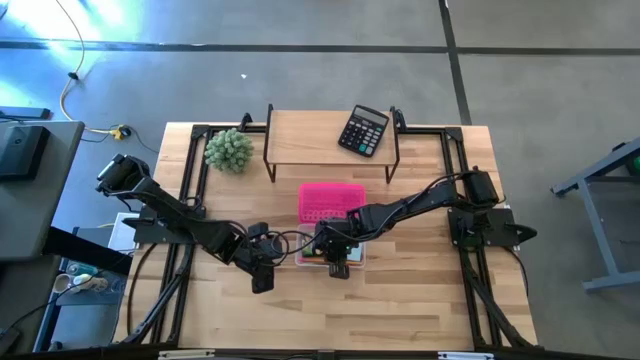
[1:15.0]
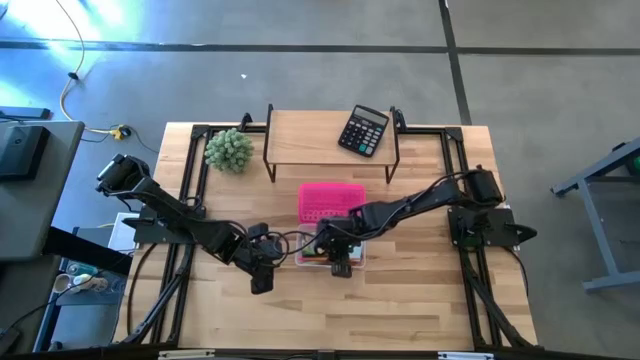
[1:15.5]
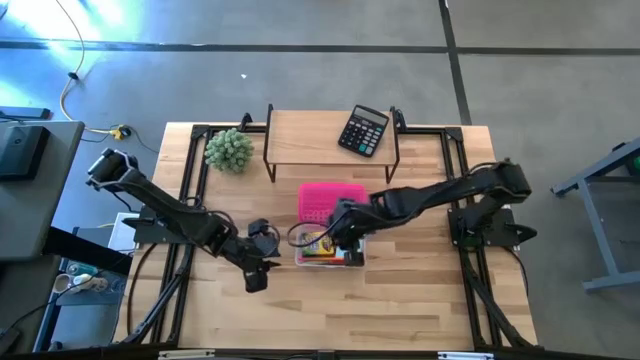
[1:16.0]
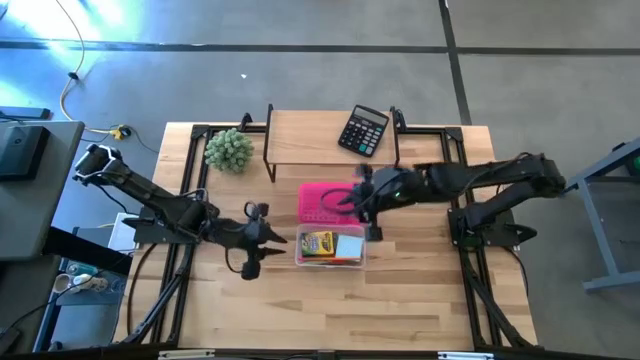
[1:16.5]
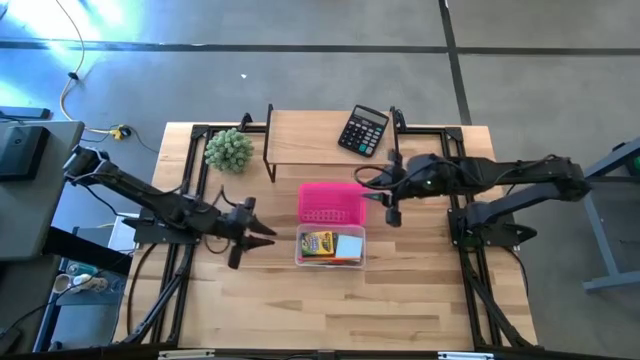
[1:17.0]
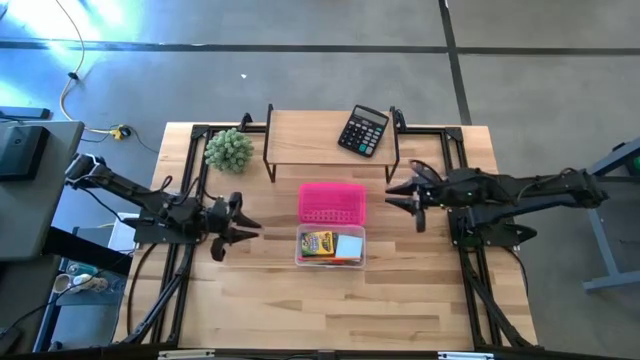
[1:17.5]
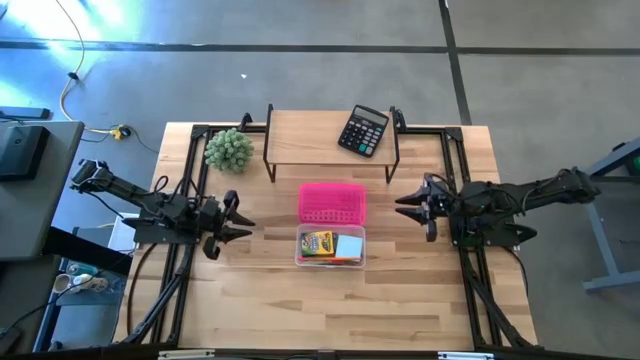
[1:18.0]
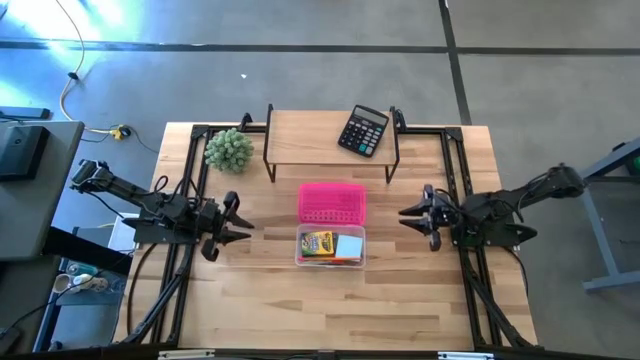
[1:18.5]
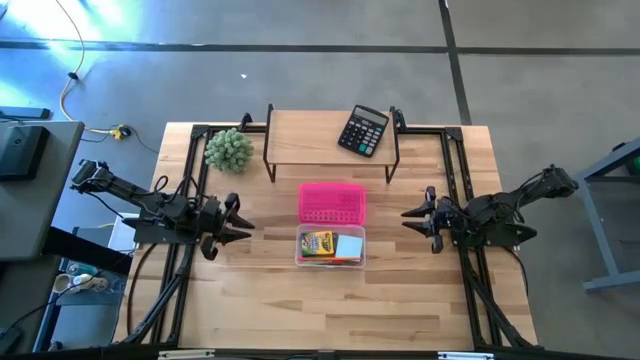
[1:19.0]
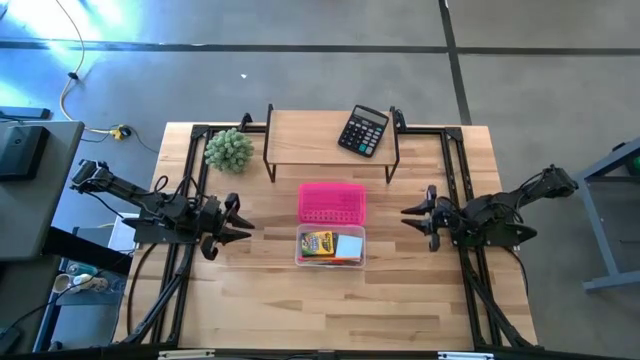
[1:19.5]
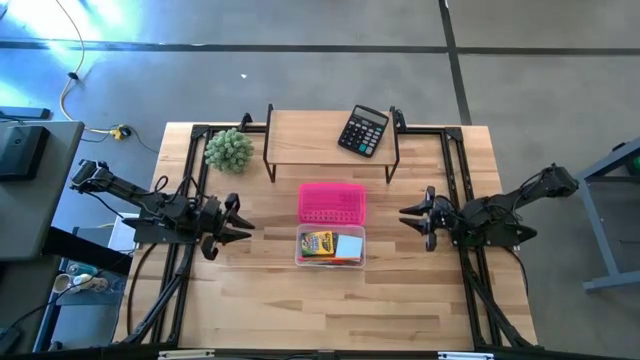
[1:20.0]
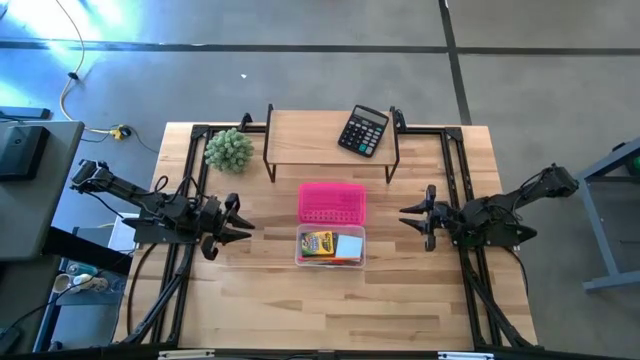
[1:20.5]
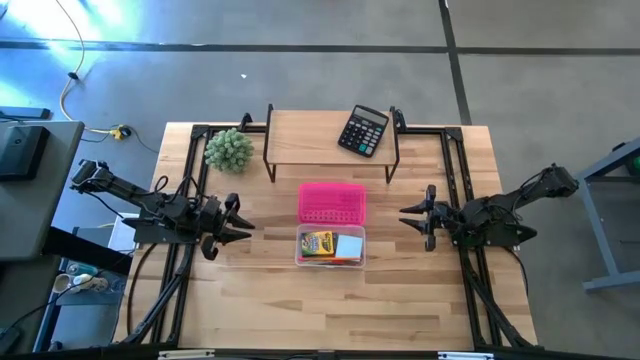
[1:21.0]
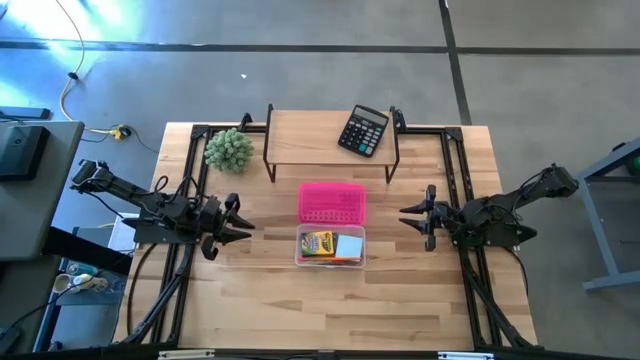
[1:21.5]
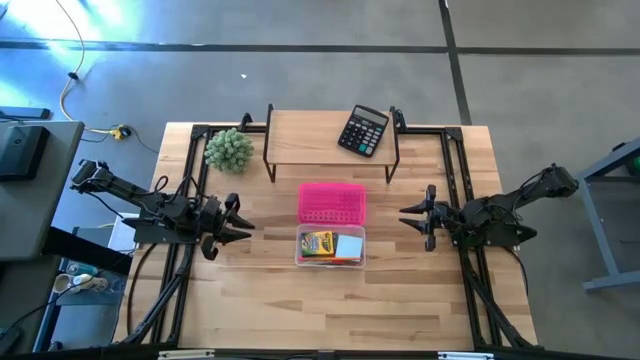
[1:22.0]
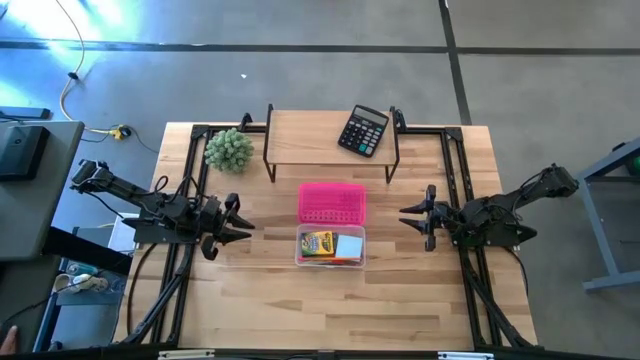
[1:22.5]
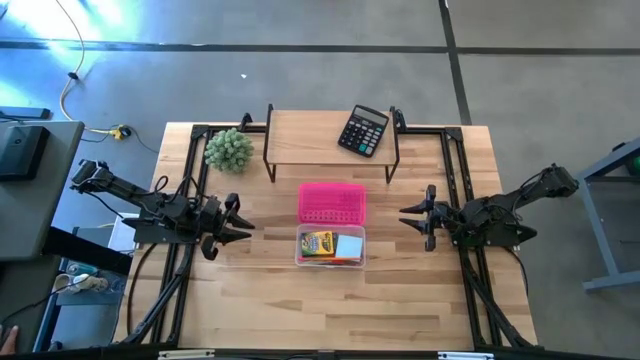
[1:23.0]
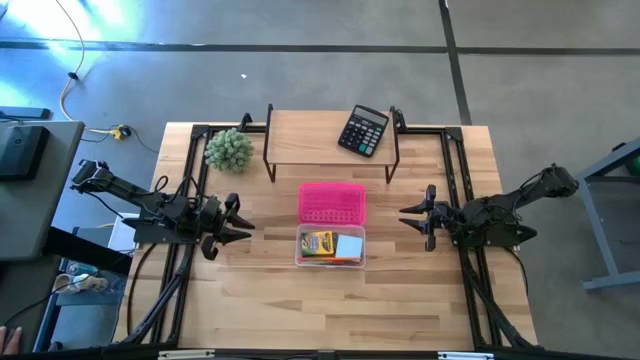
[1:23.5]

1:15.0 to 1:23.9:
Task: Pack school essentials
Return to Home Position

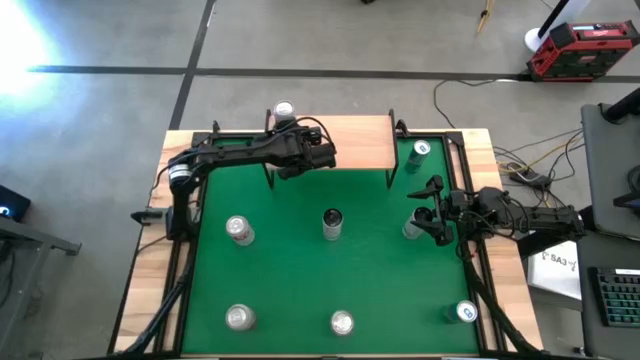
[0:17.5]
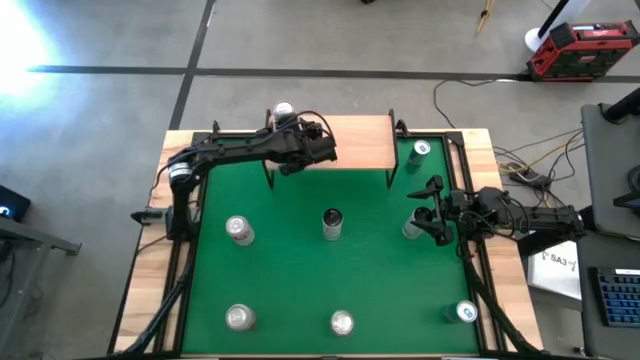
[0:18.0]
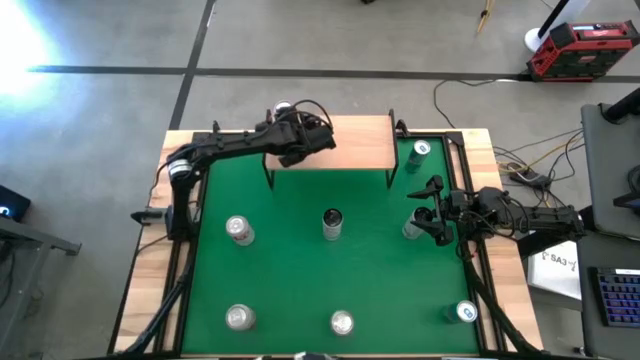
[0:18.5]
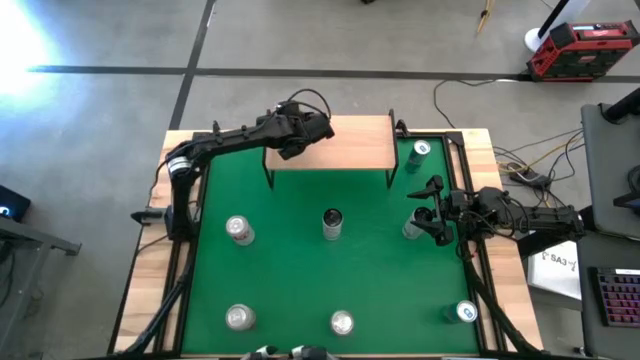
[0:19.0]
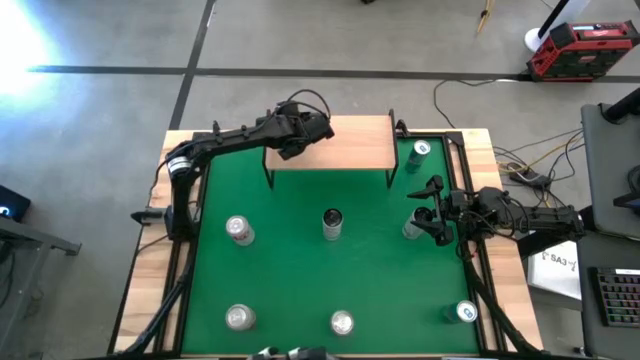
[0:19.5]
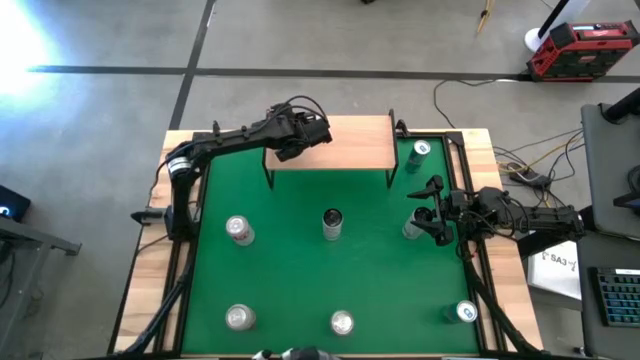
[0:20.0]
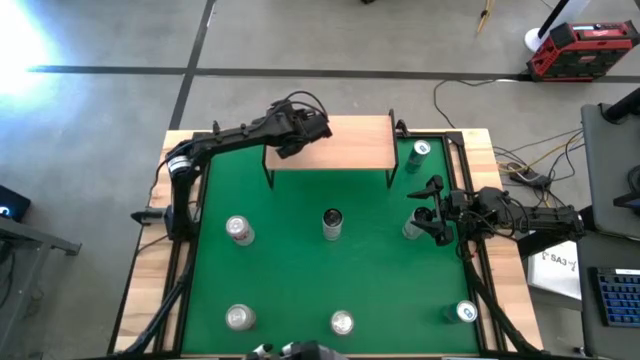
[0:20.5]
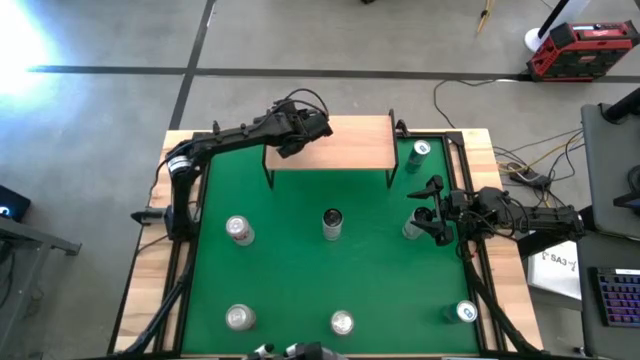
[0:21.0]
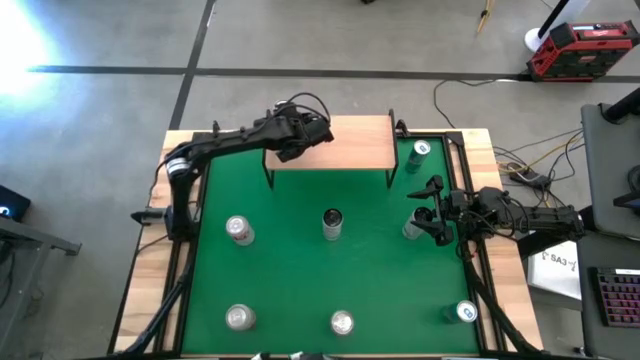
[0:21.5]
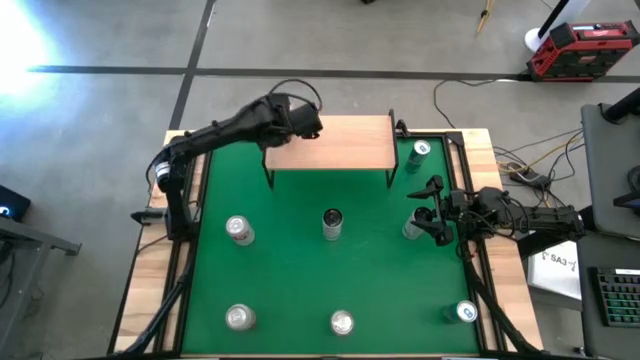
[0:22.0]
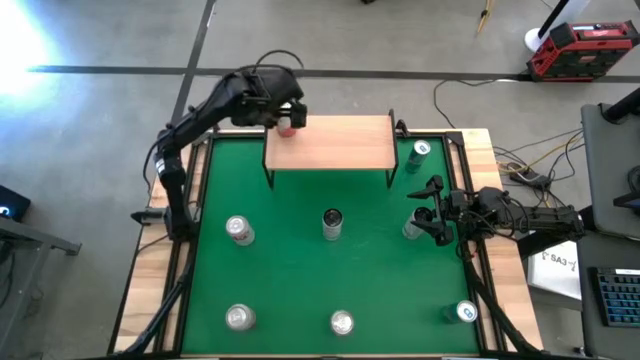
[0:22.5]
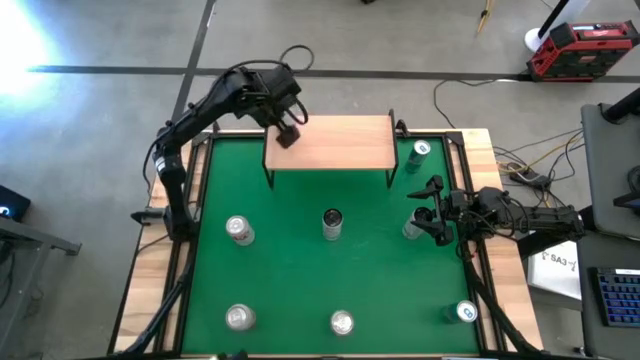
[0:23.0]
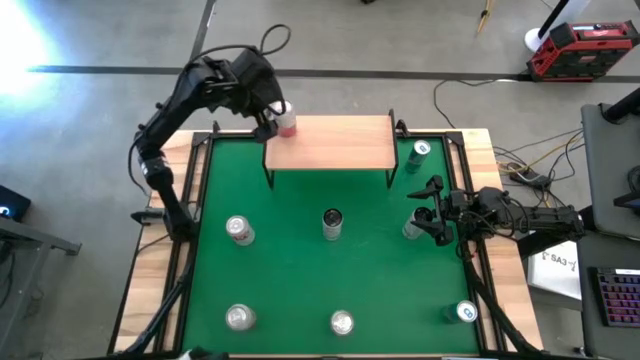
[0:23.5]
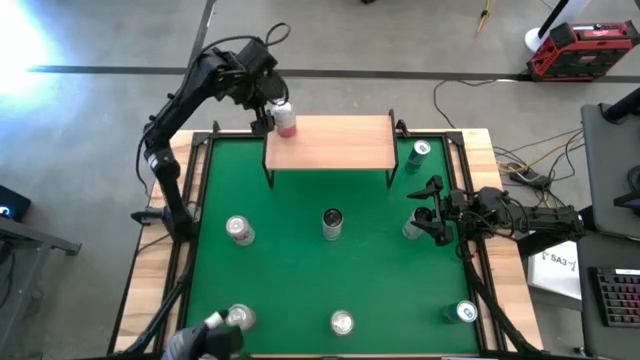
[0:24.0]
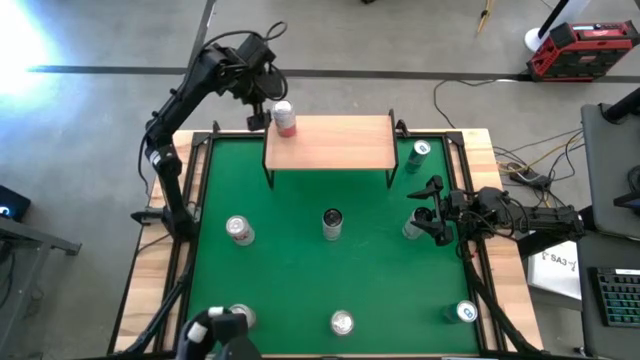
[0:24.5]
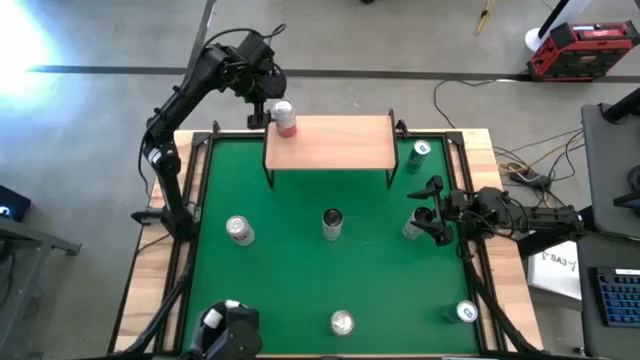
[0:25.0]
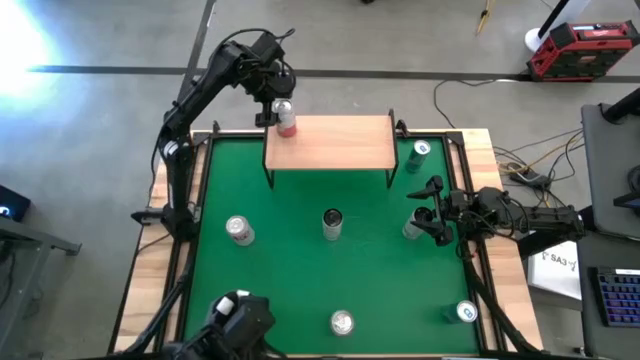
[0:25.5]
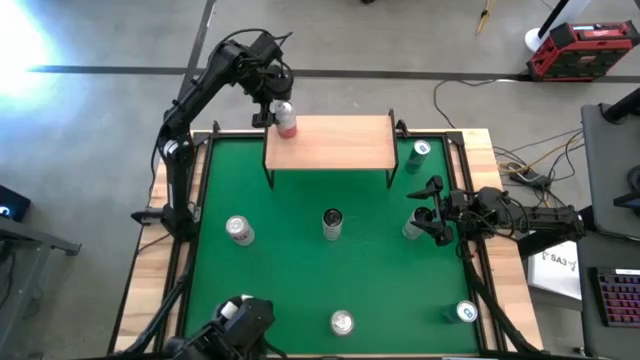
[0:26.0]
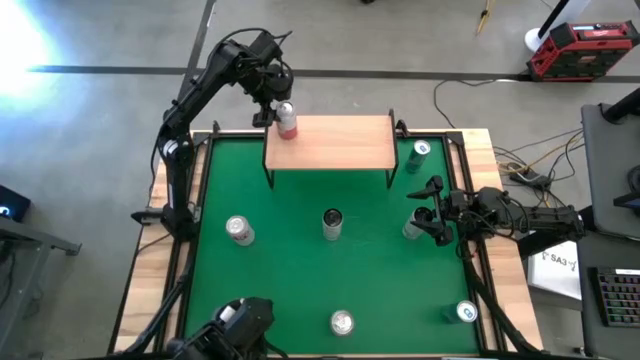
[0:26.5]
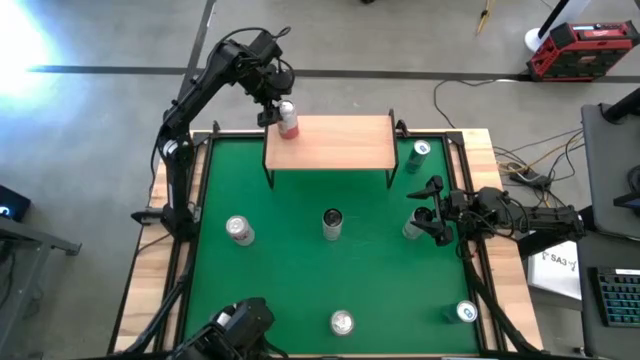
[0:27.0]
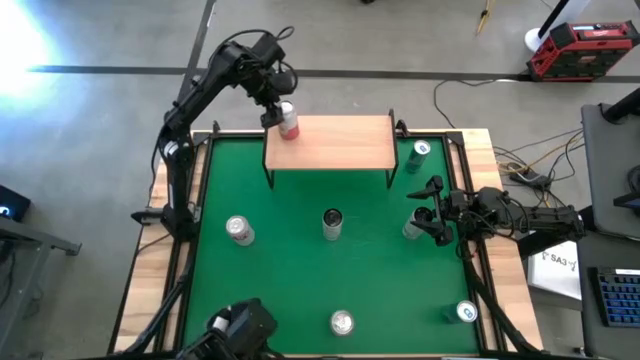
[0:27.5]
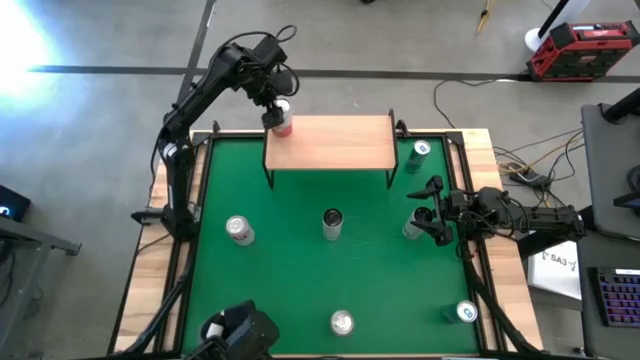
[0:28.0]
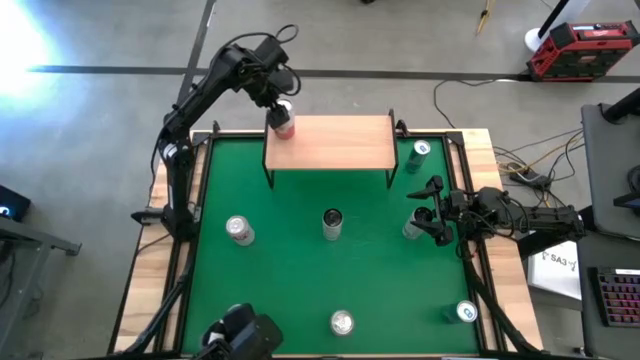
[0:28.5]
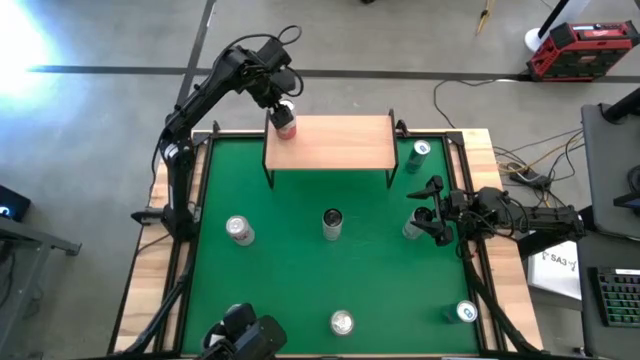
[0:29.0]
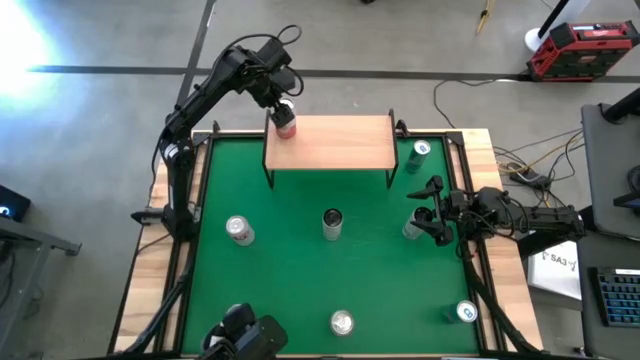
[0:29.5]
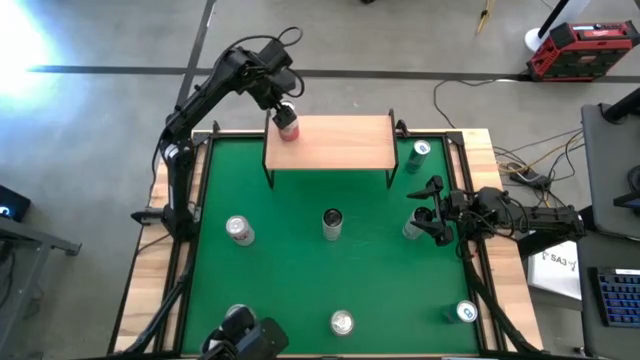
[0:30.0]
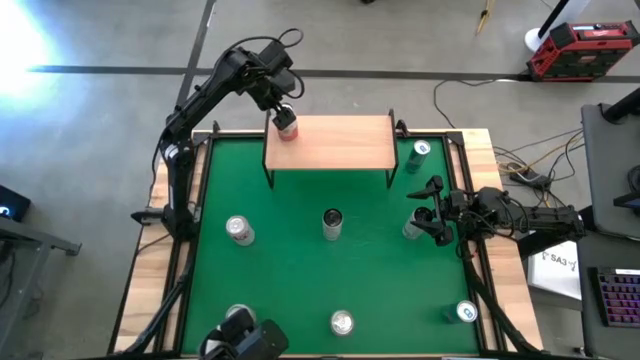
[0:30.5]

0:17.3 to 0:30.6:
Task: Place canned beverage on shelf
Put the top pink-white soda can on the shelf
